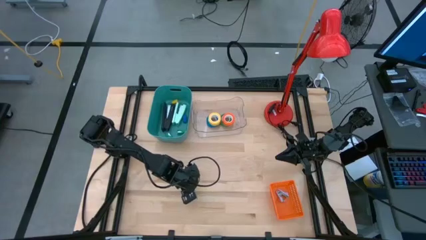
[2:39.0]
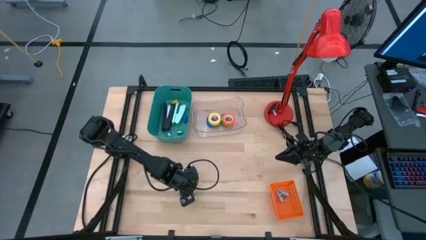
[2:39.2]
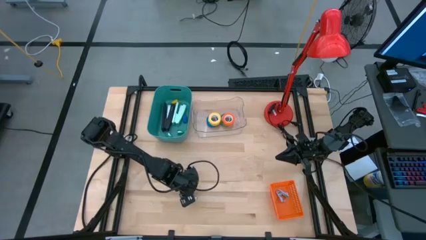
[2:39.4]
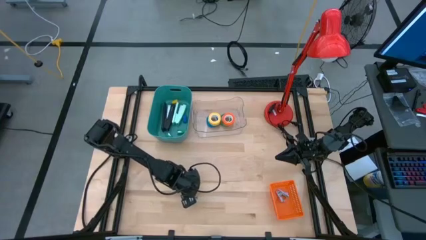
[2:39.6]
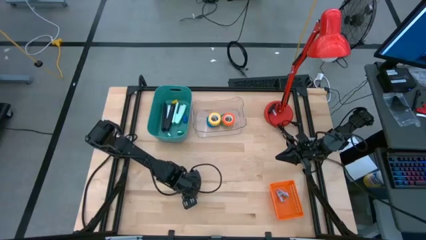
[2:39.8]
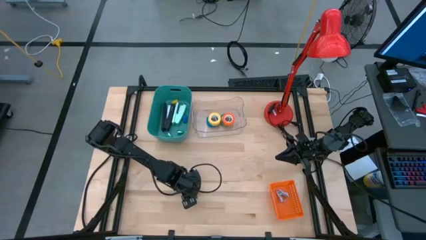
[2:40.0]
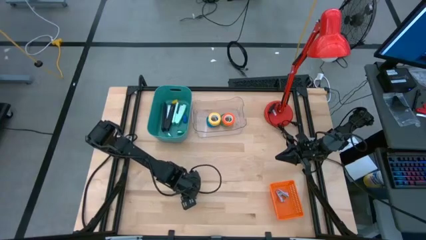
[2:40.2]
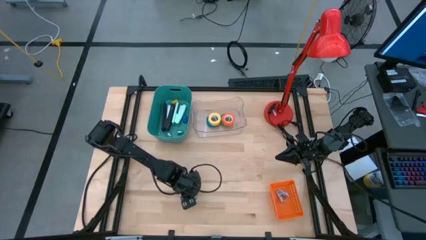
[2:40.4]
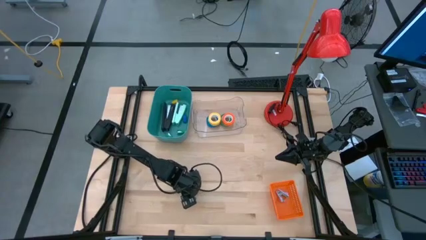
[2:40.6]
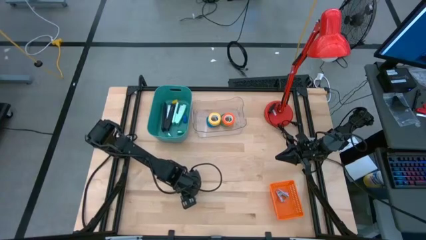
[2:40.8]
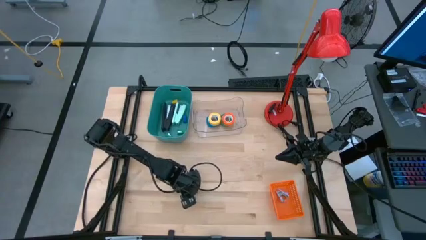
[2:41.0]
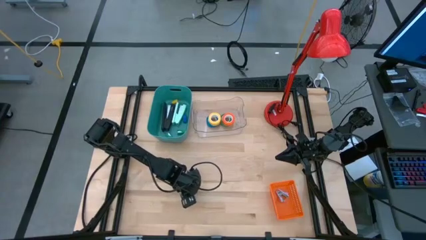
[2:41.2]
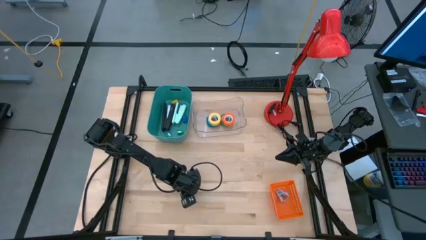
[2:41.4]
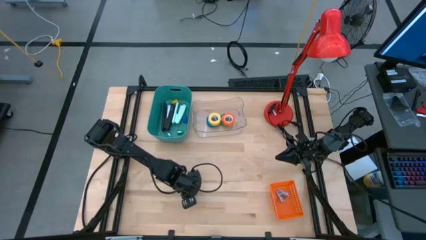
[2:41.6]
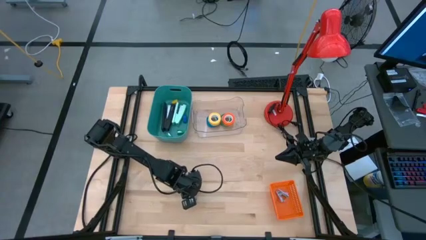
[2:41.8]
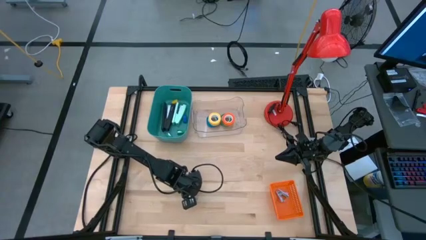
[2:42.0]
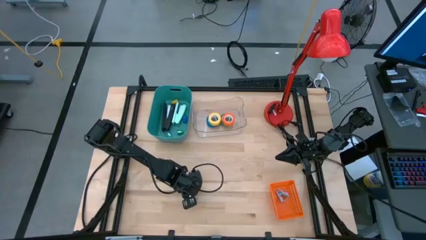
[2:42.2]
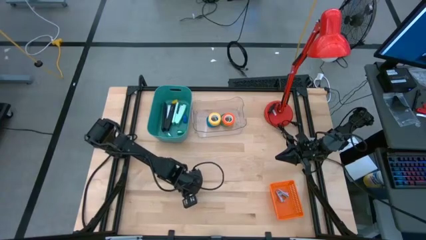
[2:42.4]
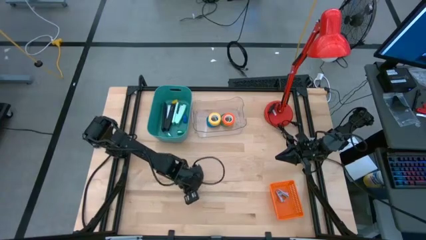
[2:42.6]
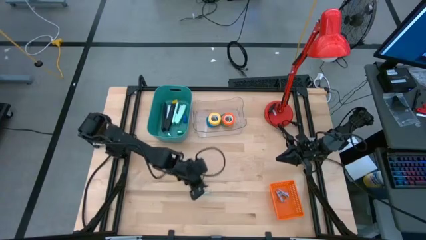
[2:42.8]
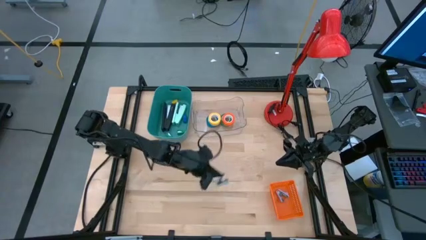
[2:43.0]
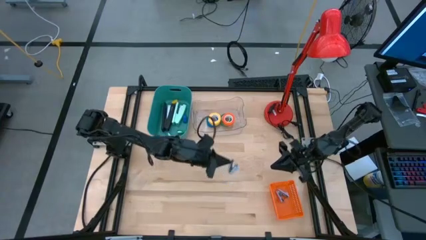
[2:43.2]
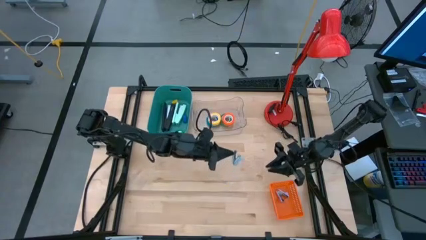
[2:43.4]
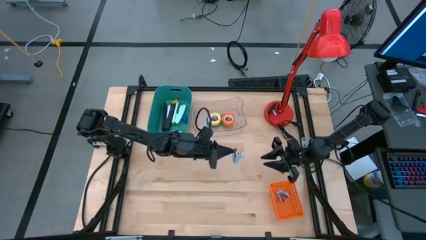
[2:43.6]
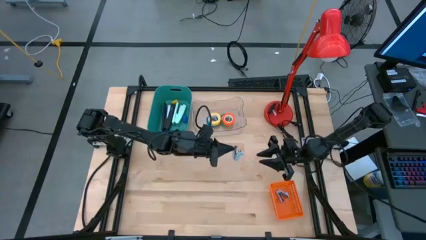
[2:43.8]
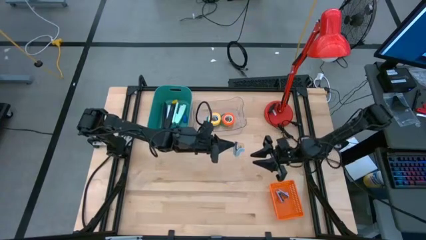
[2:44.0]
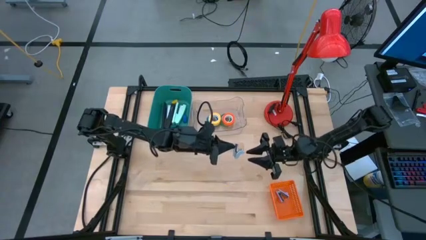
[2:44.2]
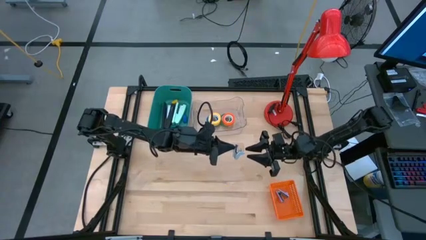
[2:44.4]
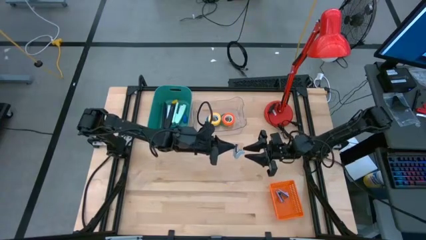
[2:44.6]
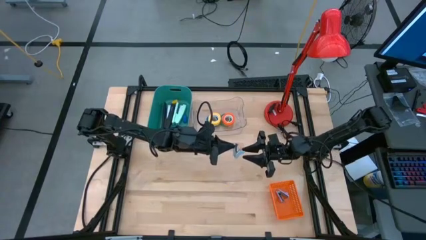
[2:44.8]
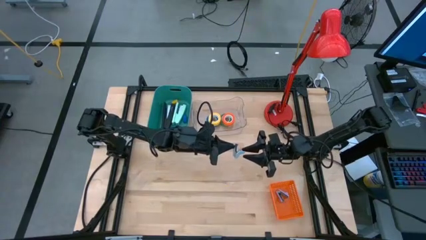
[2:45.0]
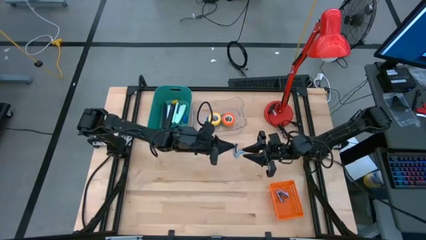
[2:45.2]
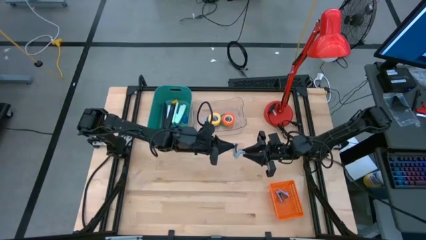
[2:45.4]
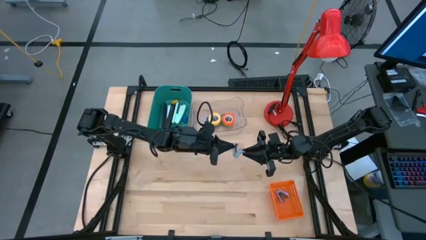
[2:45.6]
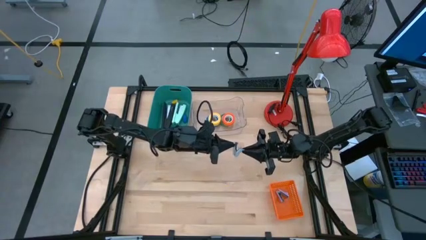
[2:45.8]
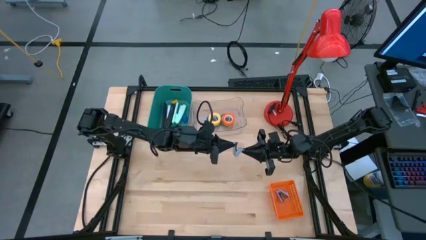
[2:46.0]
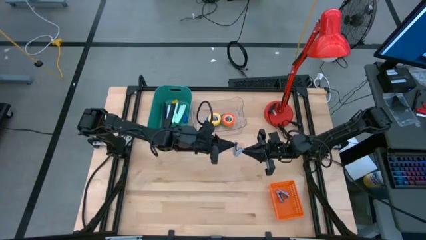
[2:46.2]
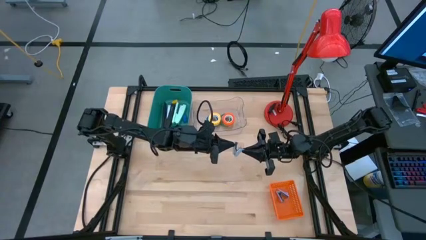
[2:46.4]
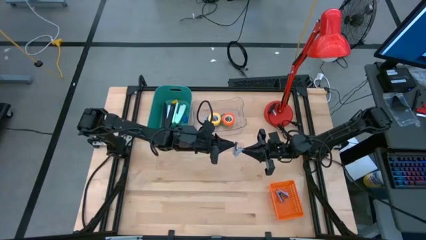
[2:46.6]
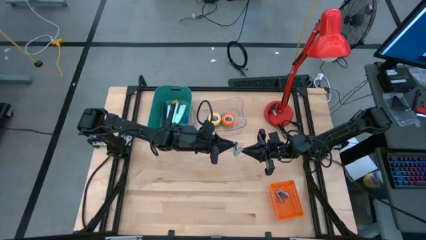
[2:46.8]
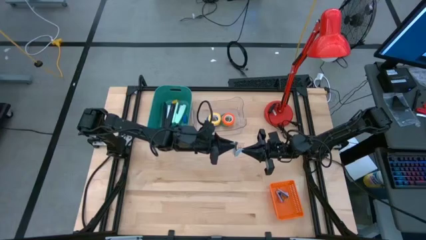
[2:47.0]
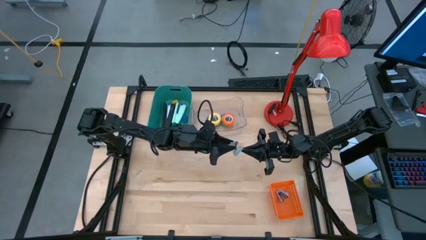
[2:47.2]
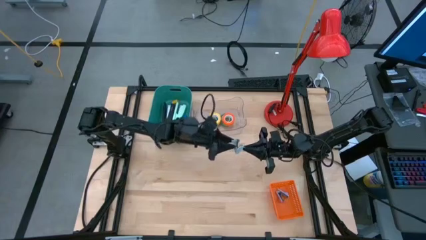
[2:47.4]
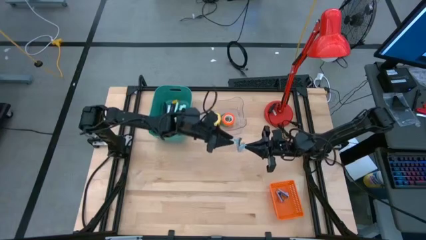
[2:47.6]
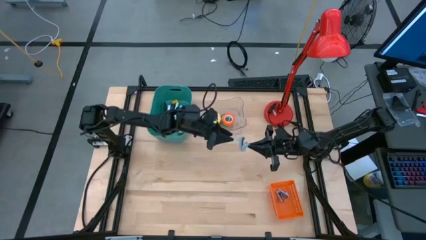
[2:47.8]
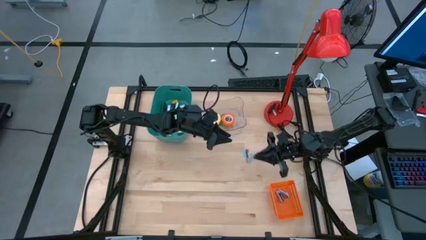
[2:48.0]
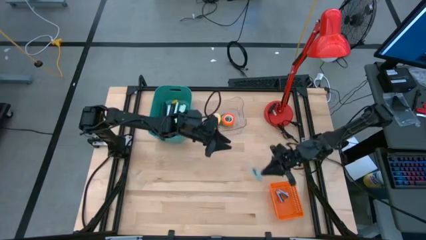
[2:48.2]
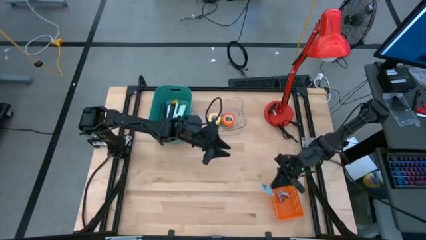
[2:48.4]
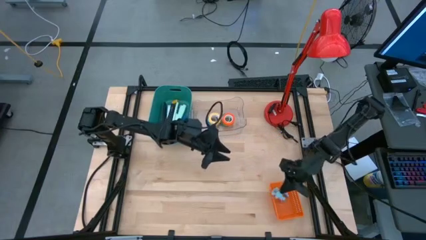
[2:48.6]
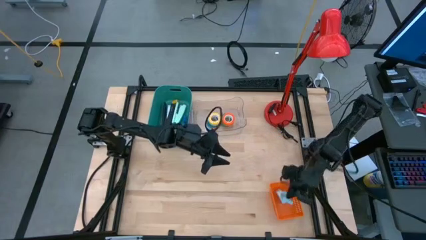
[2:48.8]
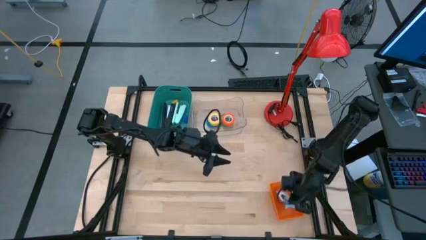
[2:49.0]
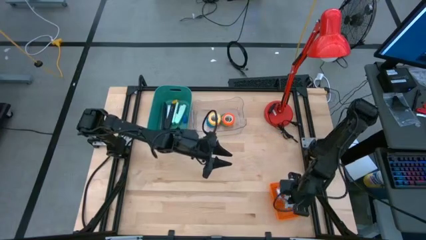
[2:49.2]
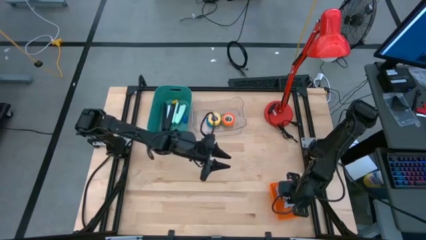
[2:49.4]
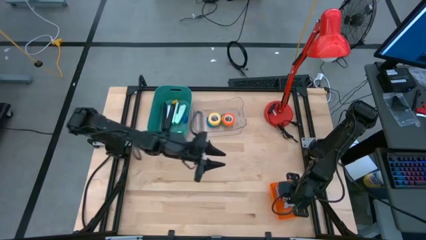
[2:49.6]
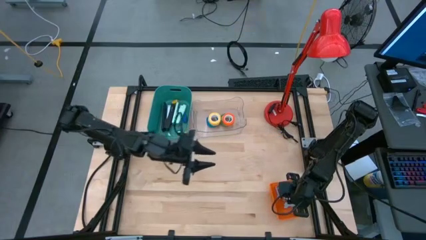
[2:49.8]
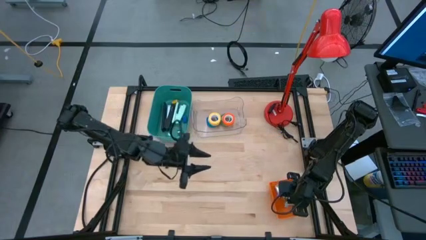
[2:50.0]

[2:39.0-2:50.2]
Task: Pick and place Stapler, Stapler remover, tape
Put the gray stapler remover into the orange bin
